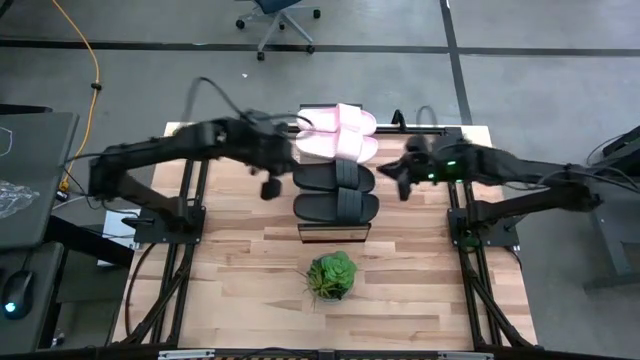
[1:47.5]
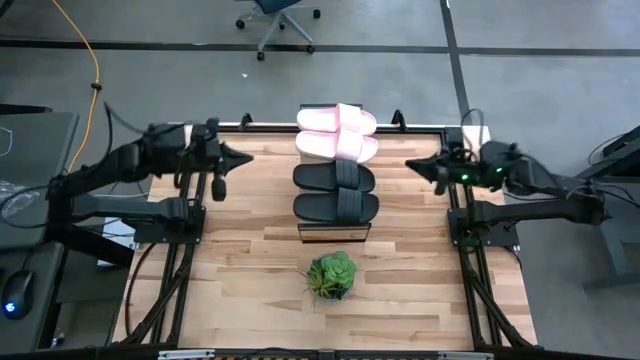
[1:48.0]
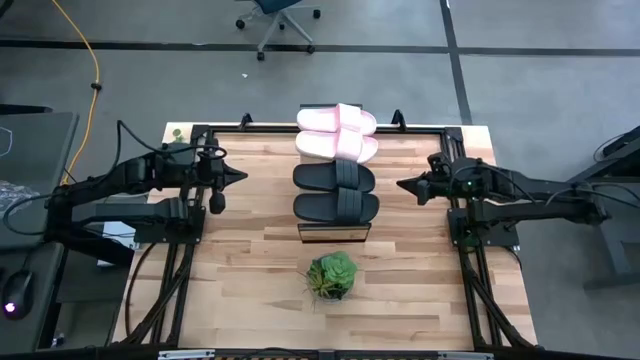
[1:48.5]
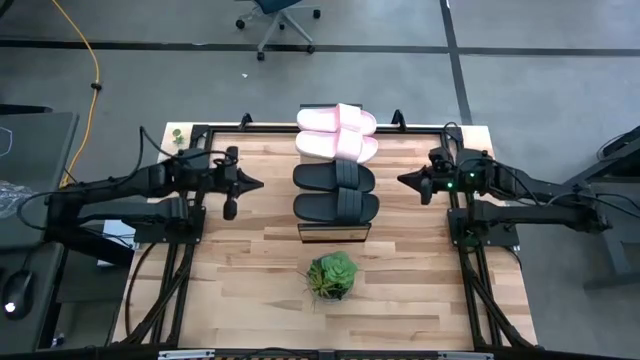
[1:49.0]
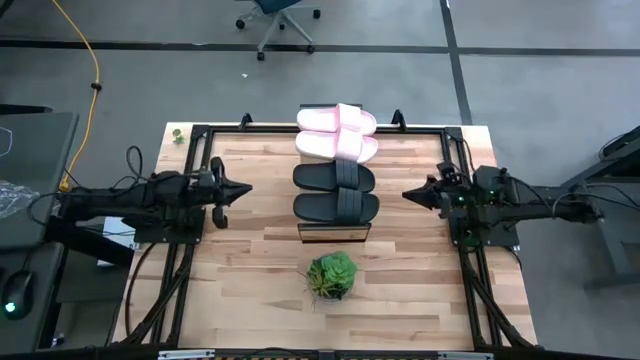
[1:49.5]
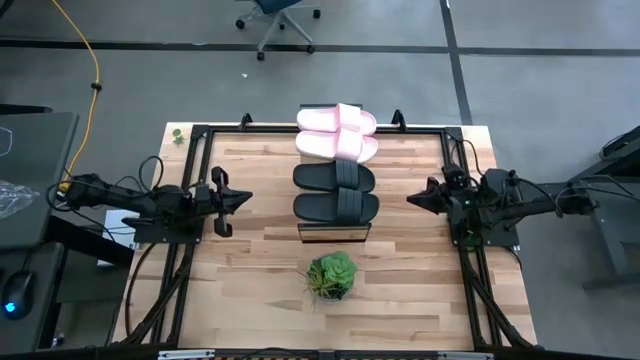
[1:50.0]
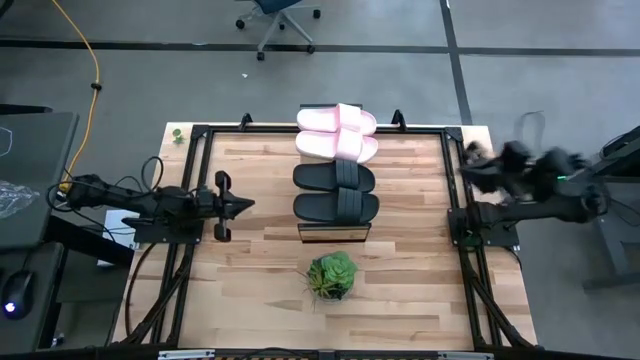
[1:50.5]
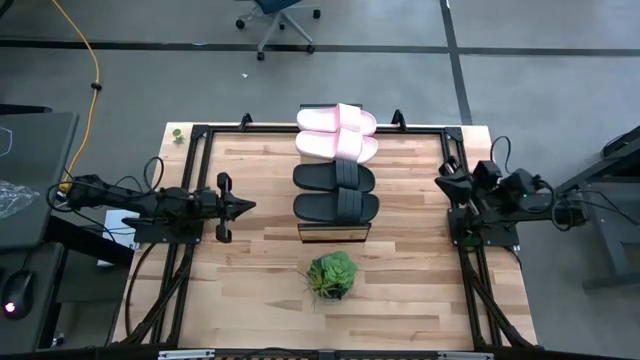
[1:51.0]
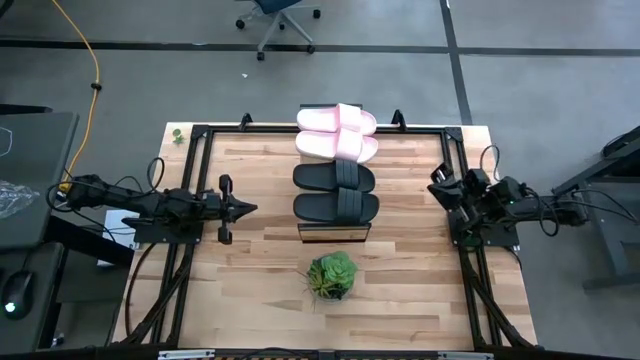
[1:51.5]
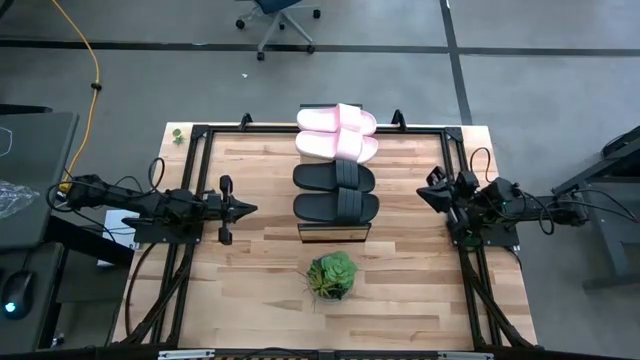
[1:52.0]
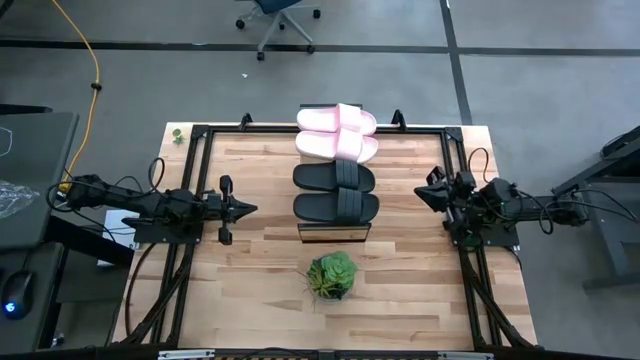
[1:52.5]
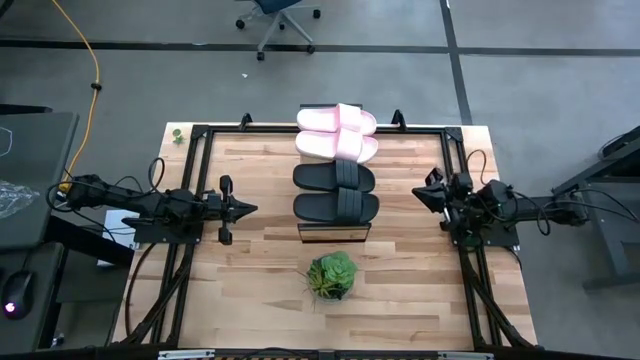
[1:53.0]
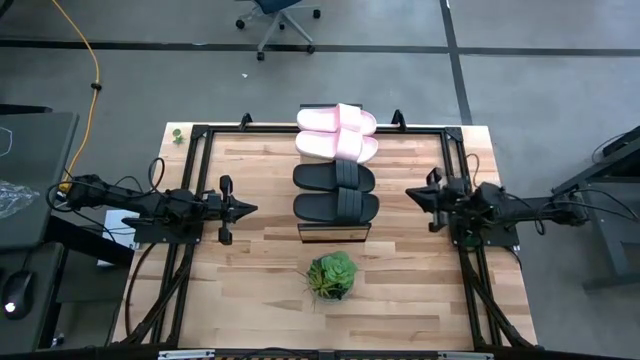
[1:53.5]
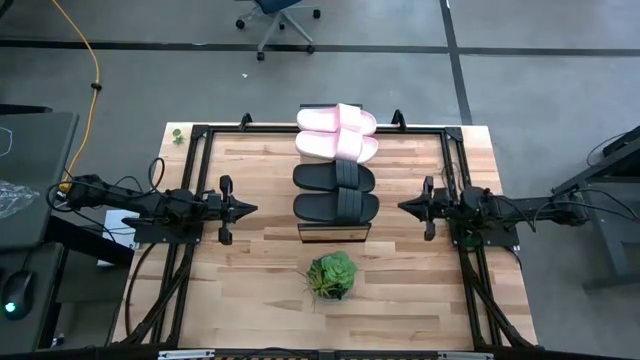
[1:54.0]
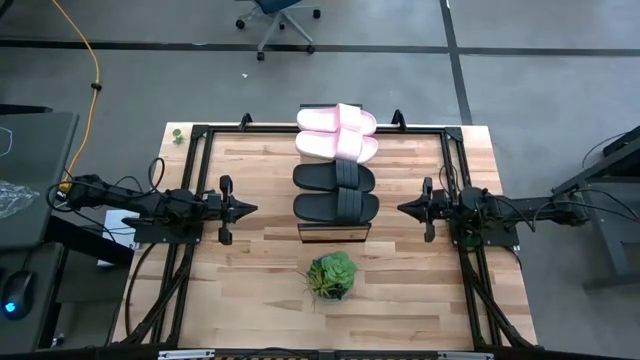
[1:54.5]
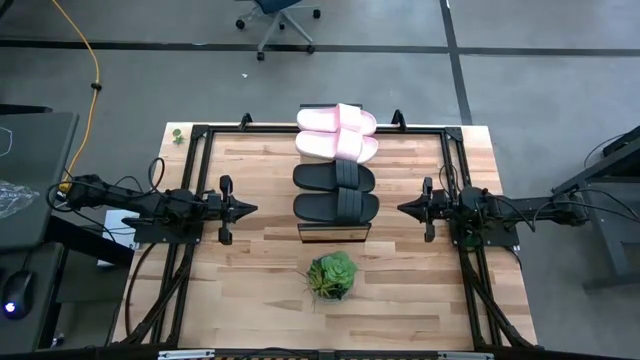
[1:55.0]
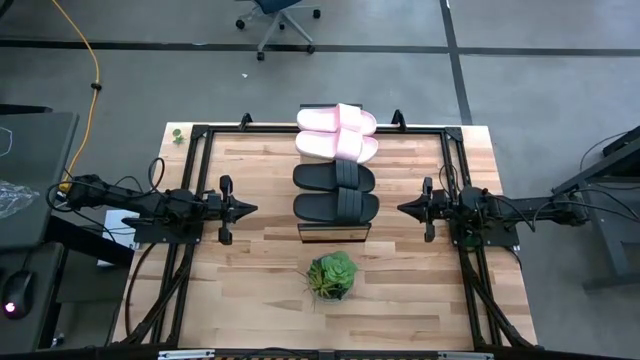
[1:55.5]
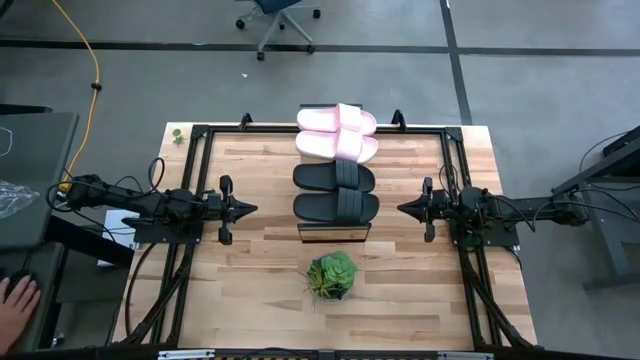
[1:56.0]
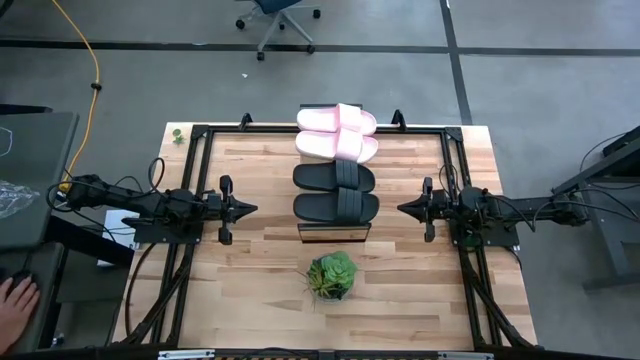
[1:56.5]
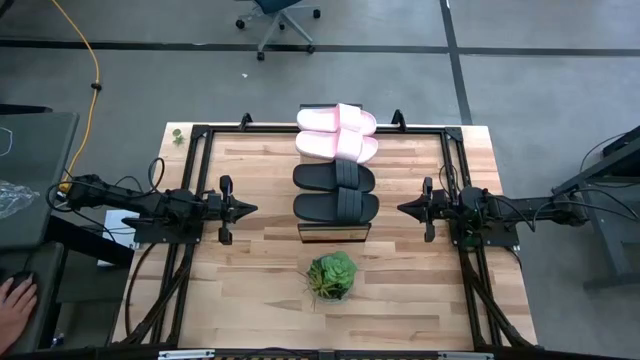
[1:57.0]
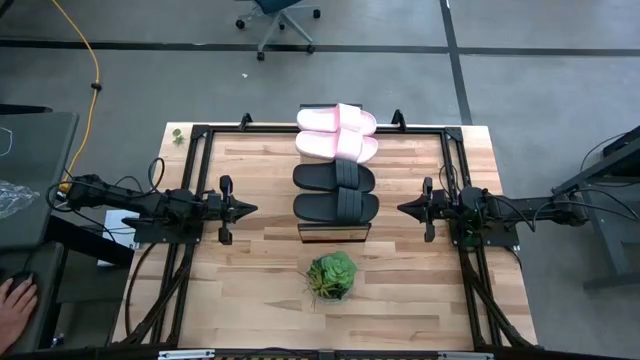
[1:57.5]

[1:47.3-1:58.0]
Task: Pick and place slides into the shelf
Return to Home Position
